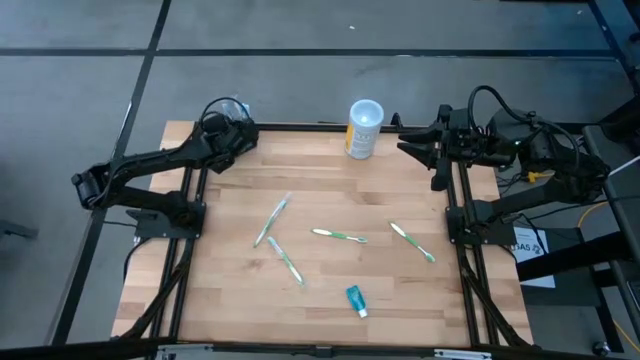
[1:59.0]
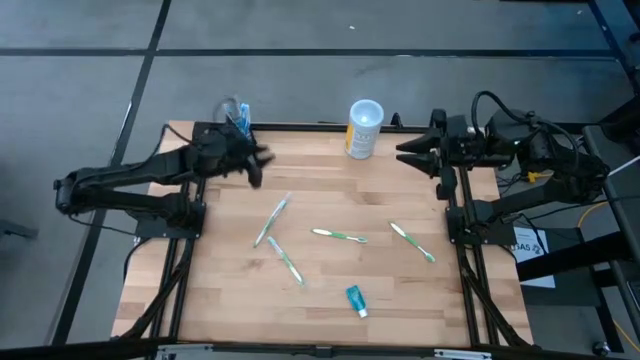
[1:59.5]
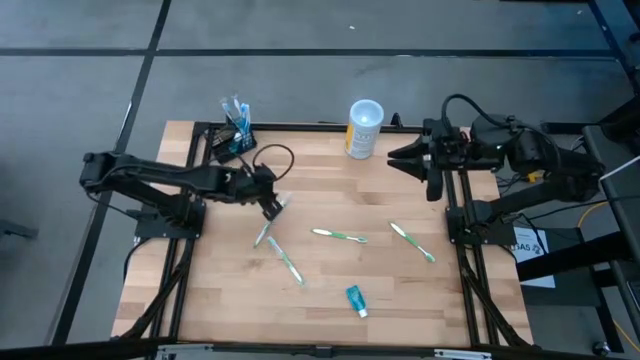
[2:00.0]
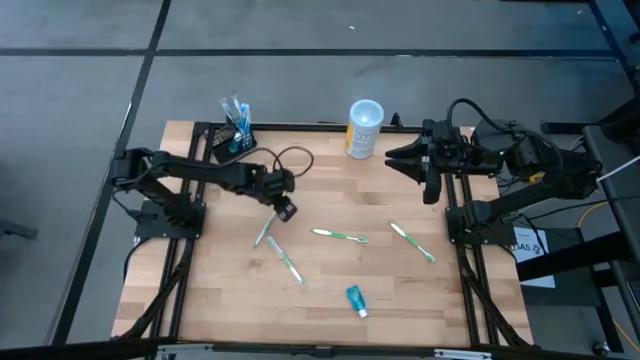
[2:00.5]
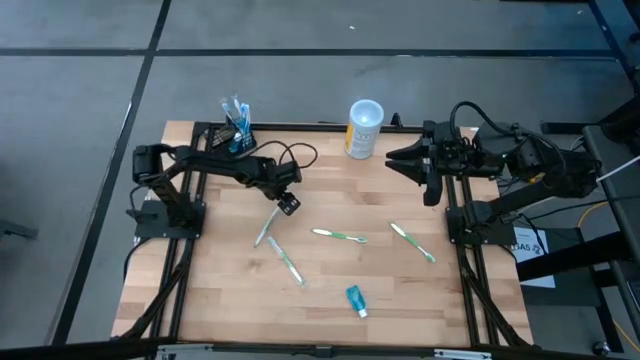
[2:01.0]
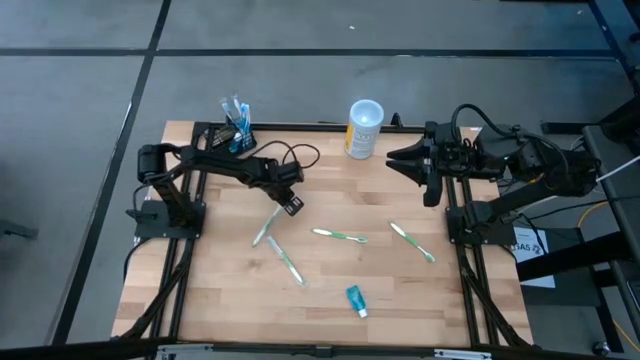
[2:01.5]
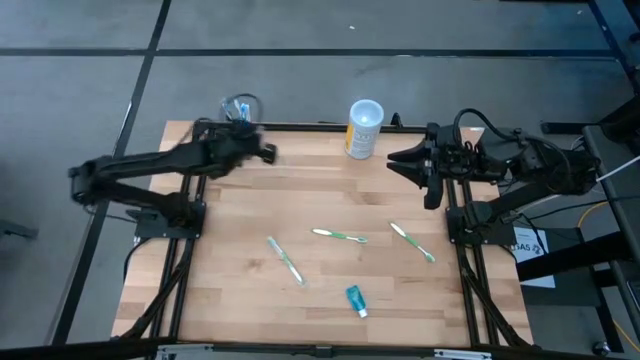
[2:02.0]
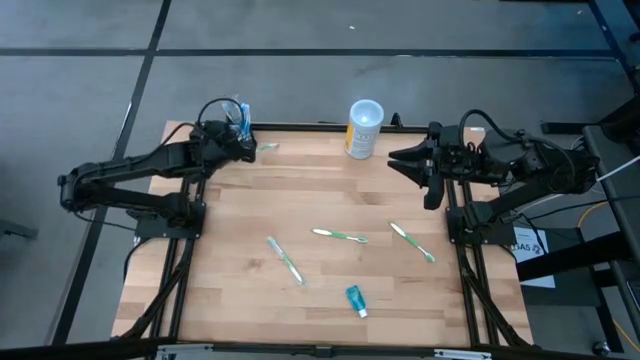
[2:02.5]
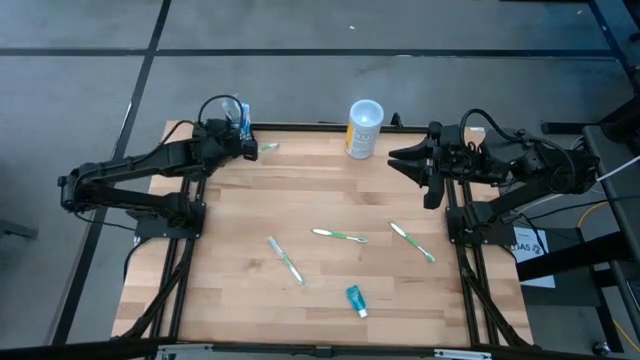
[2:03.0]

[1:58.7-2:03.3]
Task: Pick & Place toothbrushing station
Put the green toothbrush into the left section of the black organizer

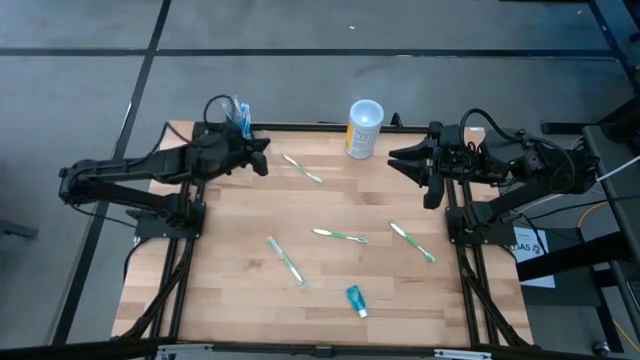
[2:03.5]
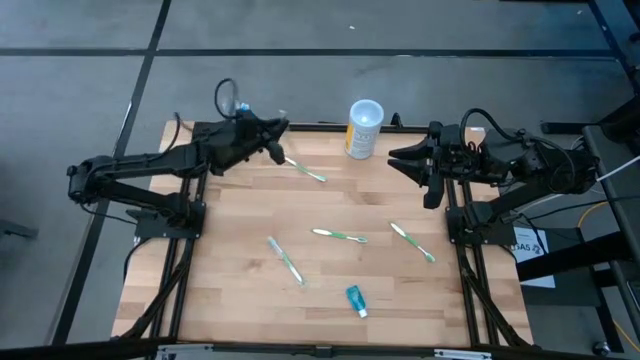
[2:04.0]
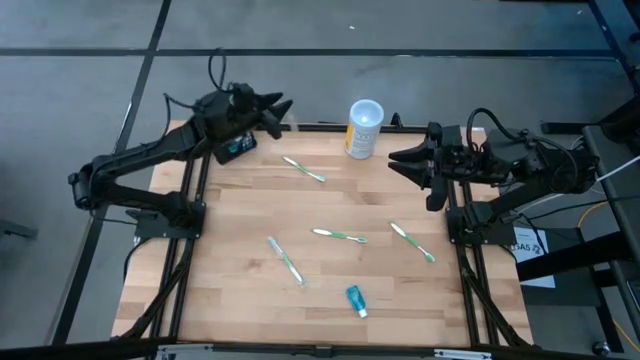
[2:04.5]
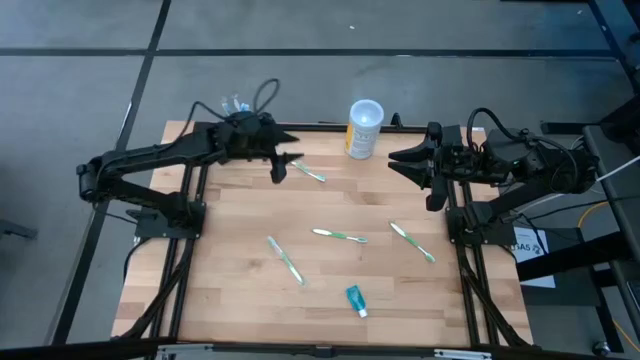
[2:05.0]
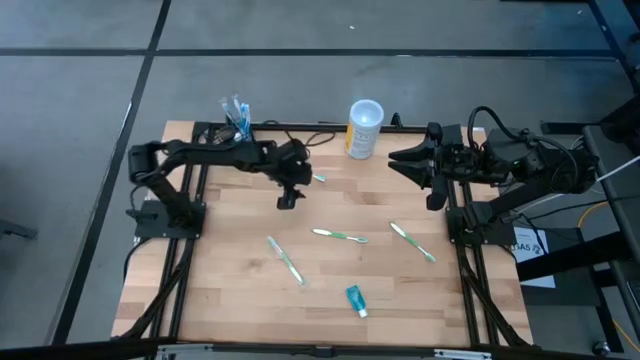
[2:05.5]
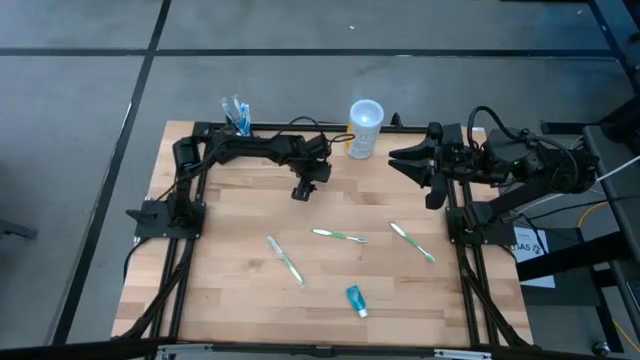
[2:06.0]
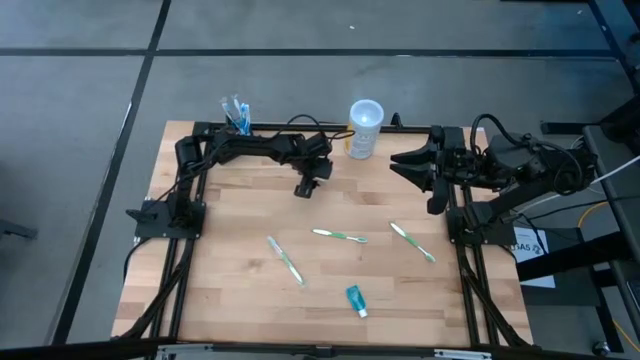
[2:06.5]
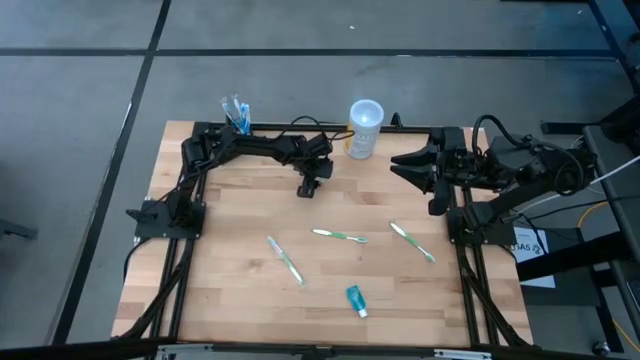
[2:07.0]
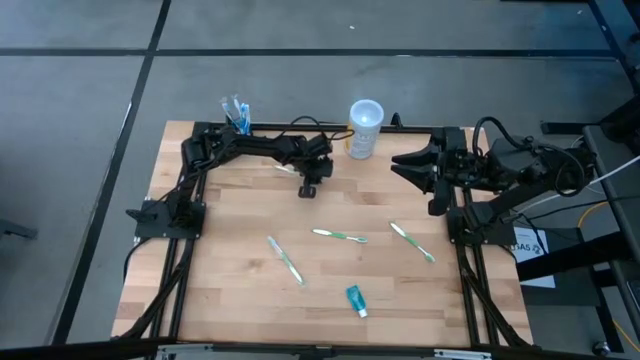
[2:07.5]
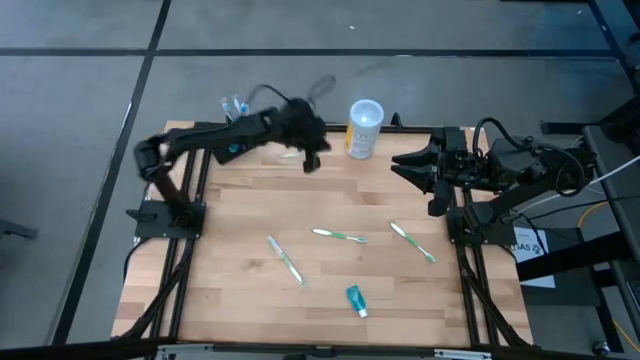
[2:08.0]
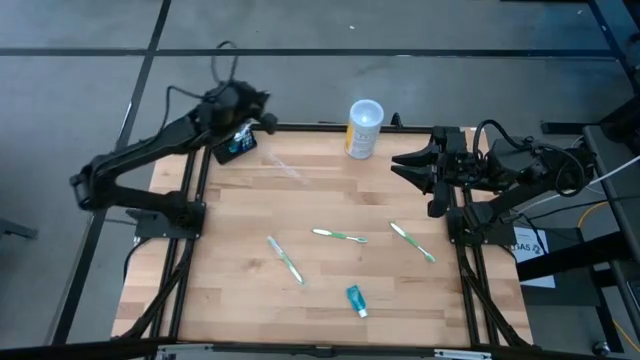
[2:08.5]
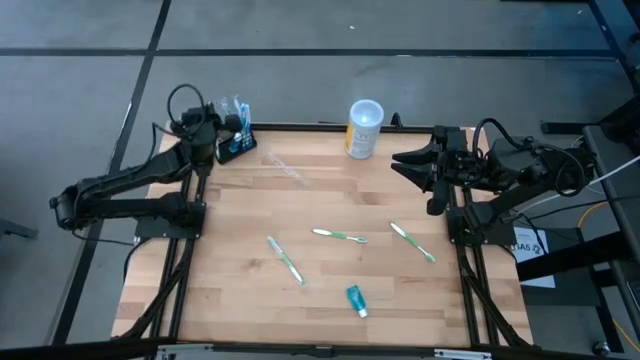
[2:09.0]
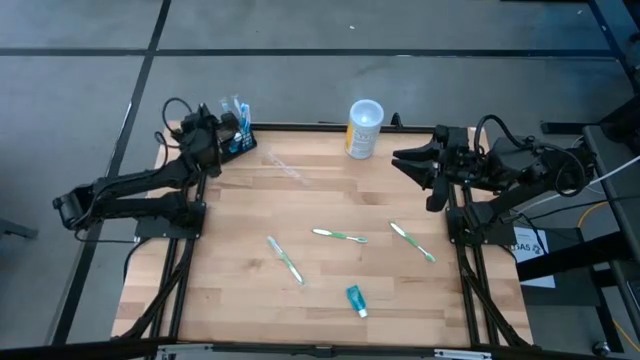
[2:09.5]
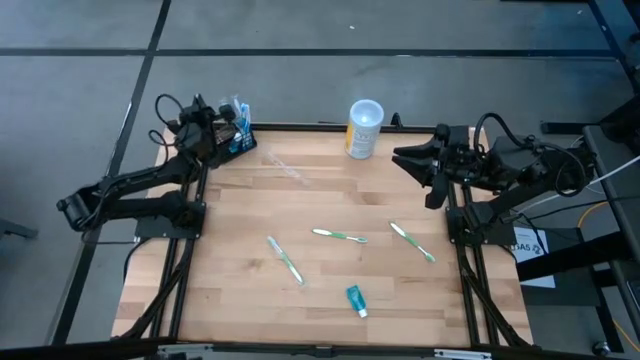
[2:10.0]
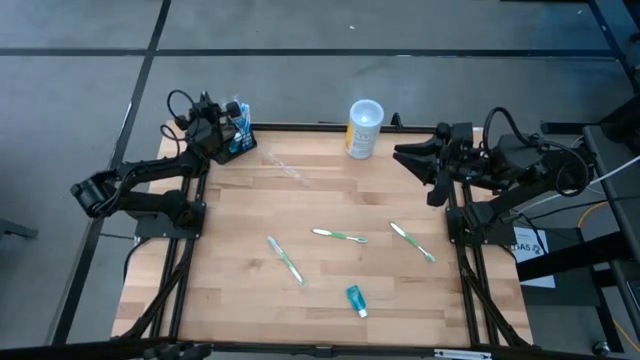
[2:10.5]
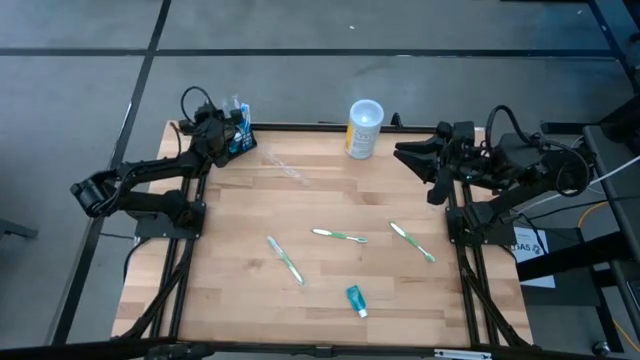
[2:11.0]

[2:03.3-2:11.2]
Put the green toothbrush into the left section of the black organizer

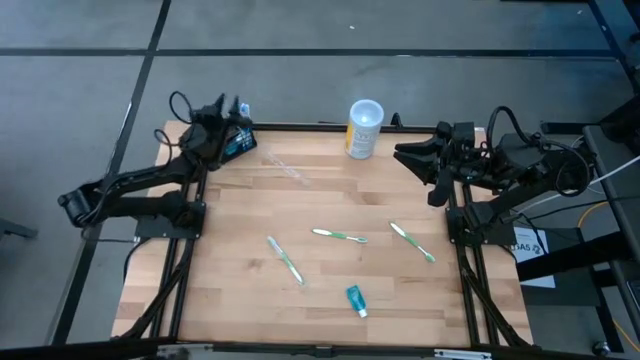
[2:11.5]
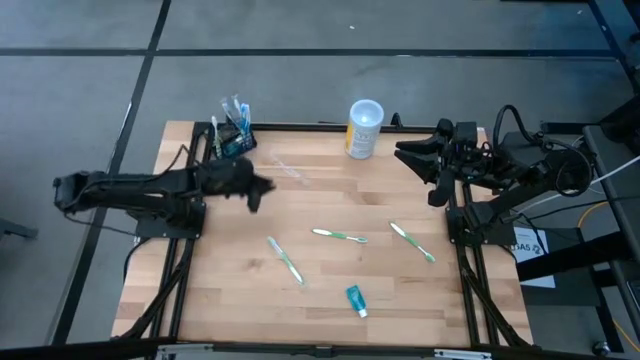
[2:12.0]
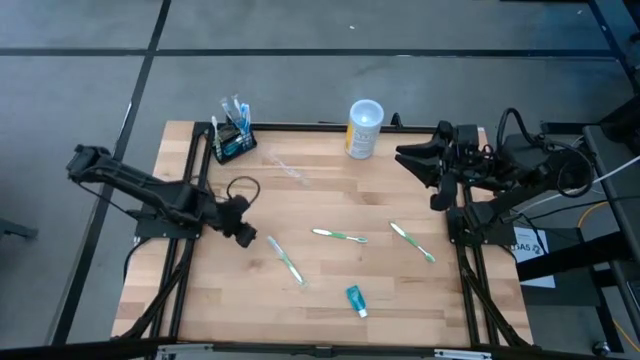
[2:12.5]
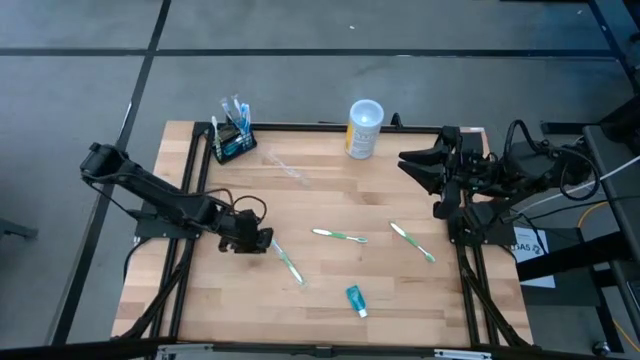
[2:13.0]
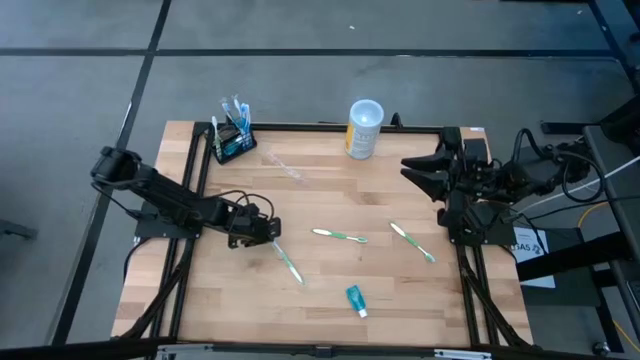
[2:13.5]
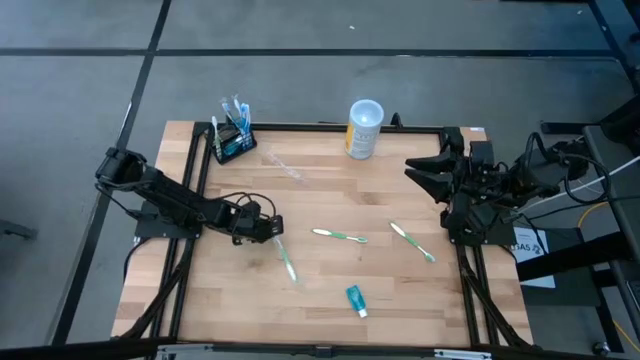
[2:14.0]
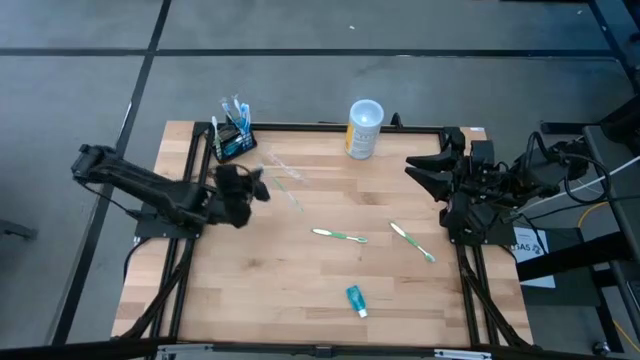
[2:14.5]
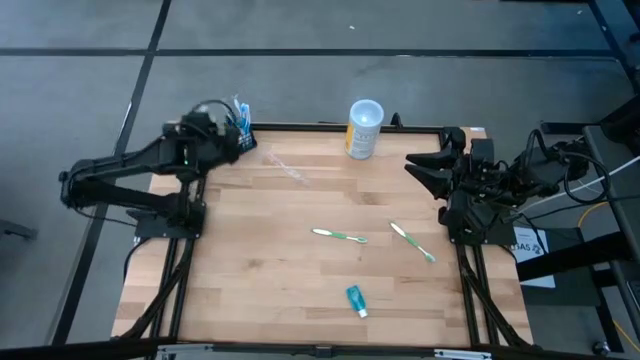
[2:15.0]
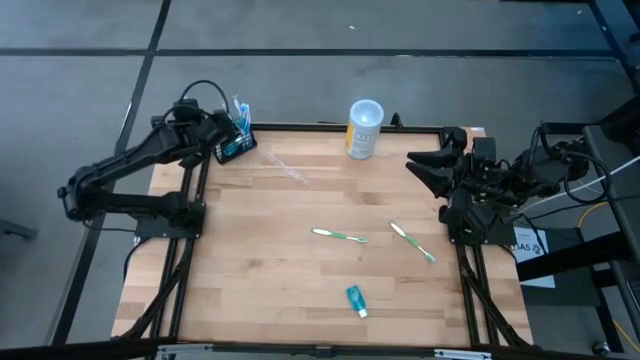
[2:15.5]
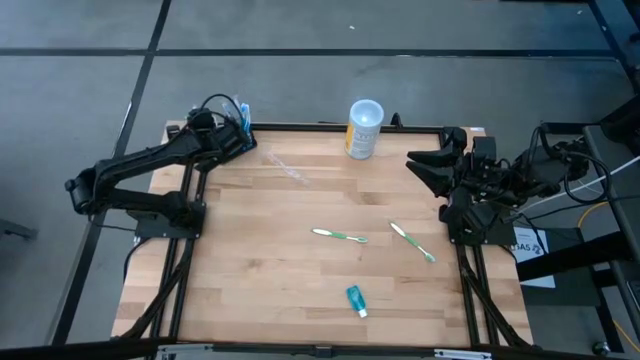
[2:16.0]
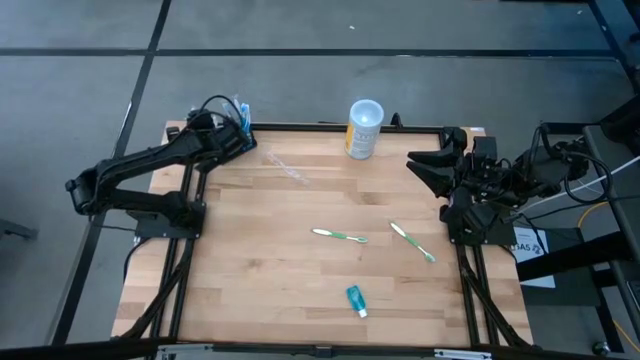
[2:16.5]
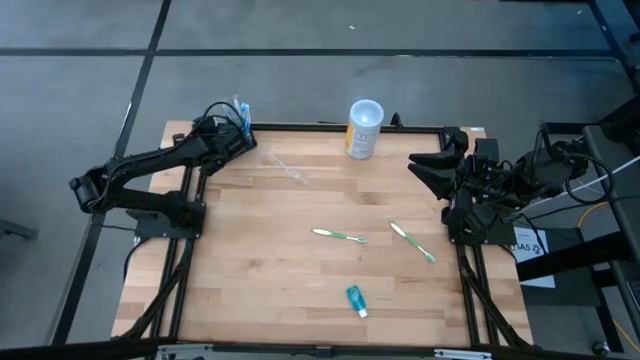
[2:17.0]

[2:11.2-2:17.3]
Put the green toothbrush into the left section of the black organizer

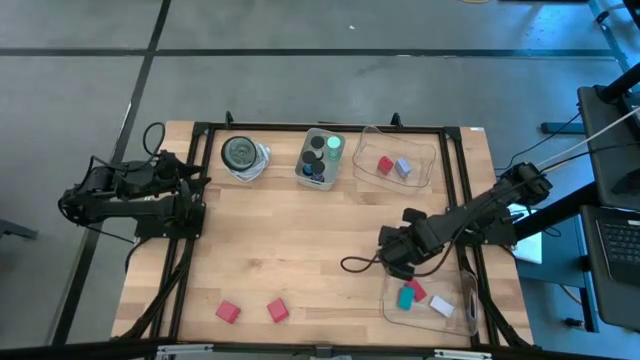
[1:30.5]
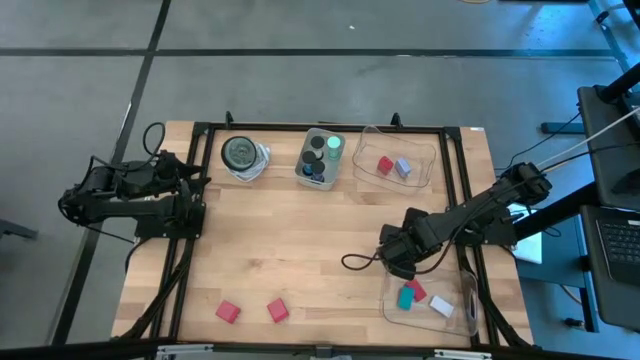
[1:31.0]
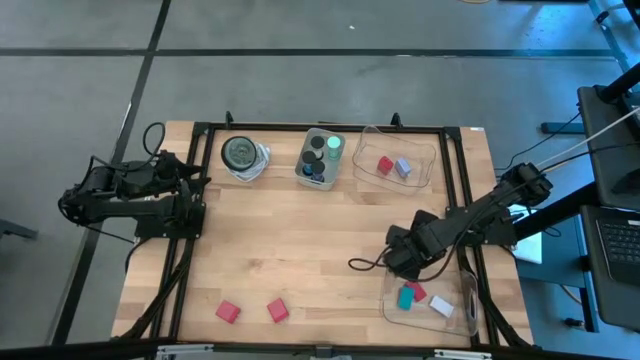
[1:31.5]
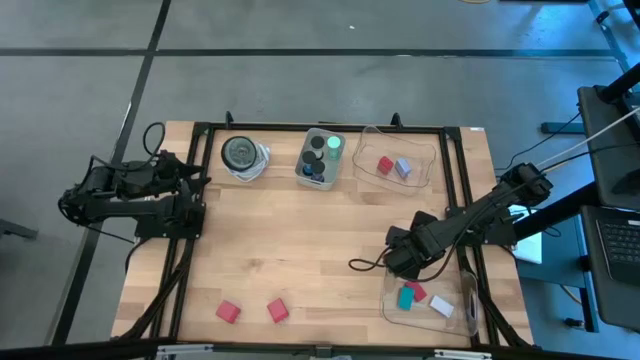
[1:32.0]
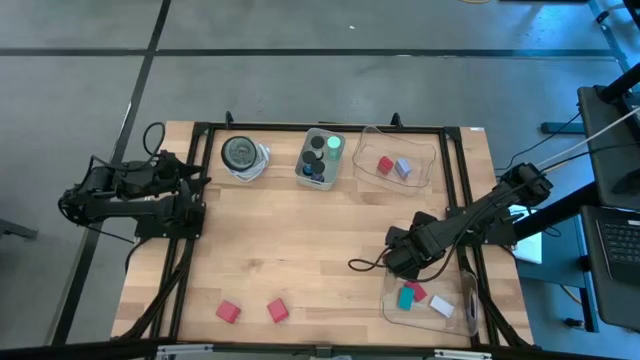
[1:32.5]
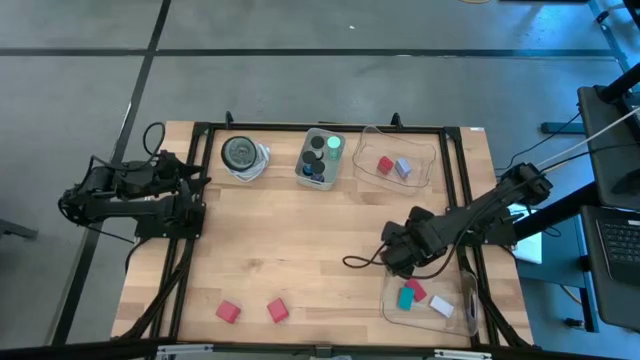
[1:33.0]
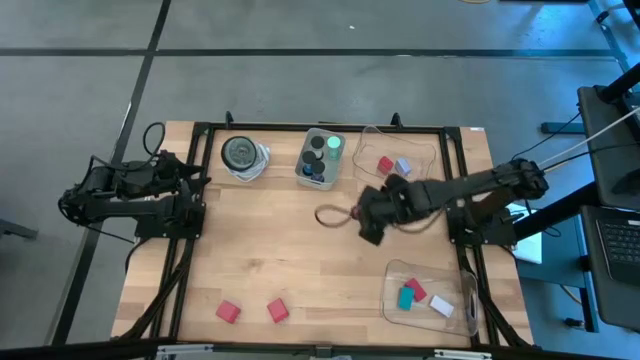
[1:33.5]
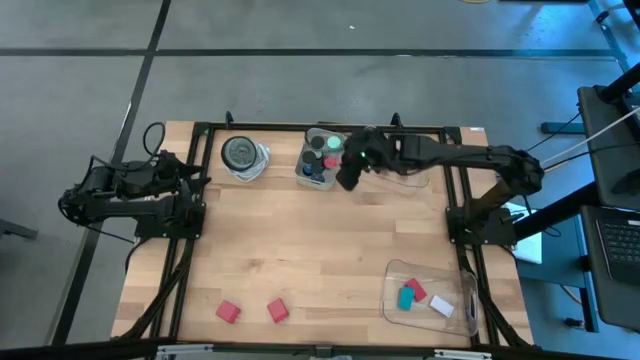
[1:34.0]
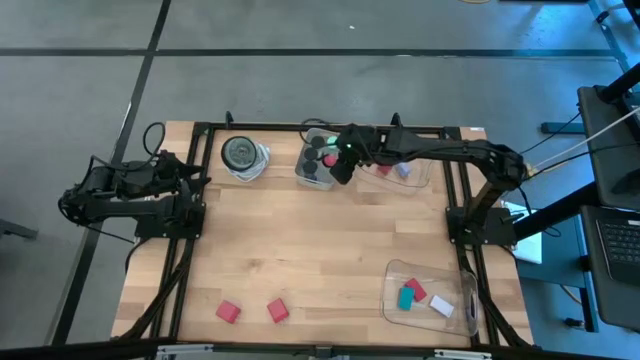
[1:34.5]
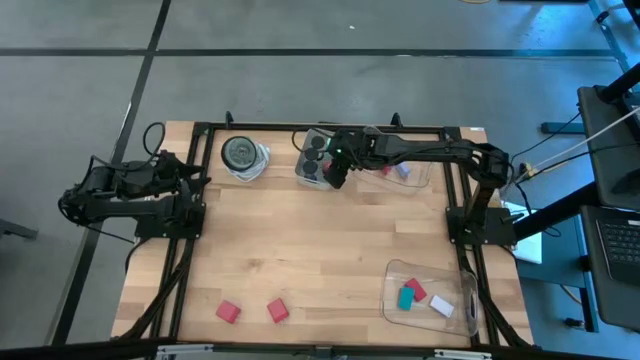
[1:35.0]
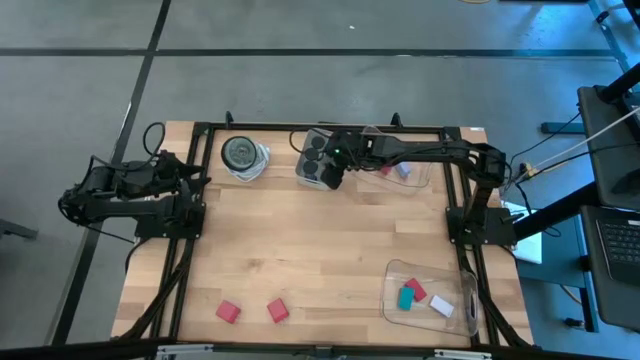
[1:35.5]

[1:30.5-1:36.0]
Task: Pick & Place Office items
Put the red hourglass into the gray bin
